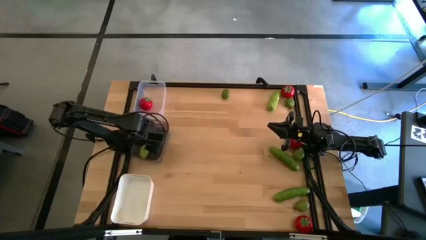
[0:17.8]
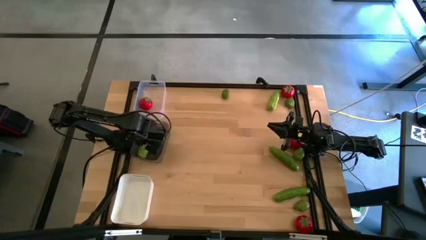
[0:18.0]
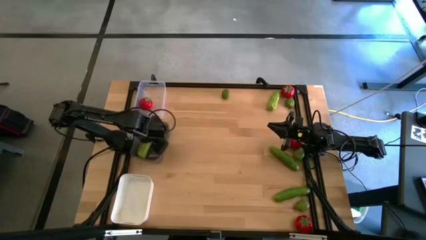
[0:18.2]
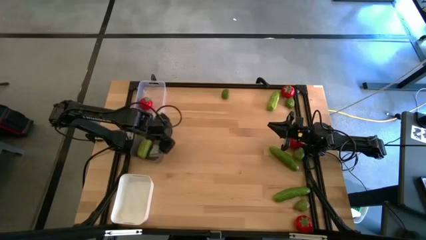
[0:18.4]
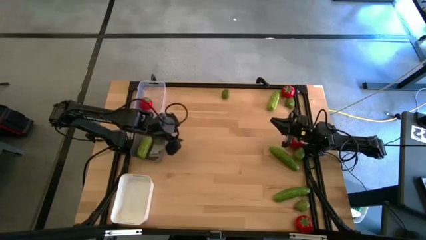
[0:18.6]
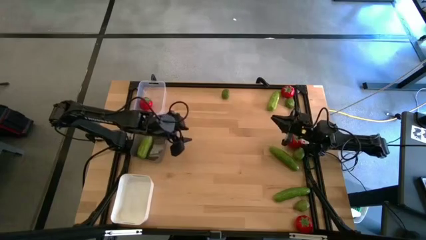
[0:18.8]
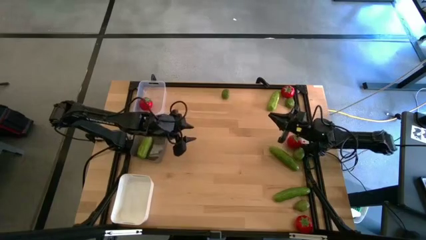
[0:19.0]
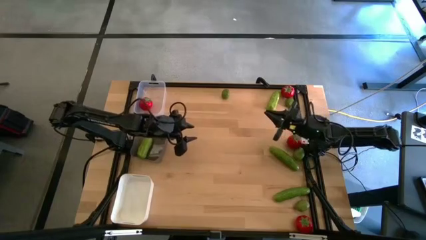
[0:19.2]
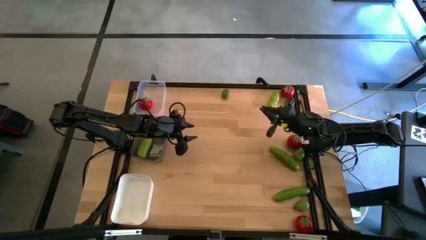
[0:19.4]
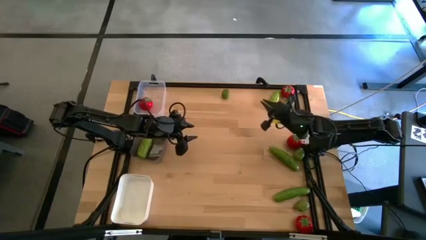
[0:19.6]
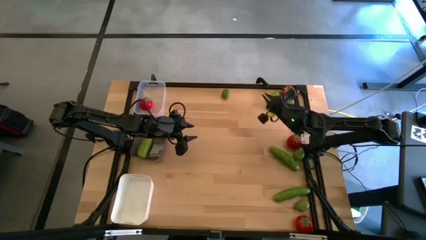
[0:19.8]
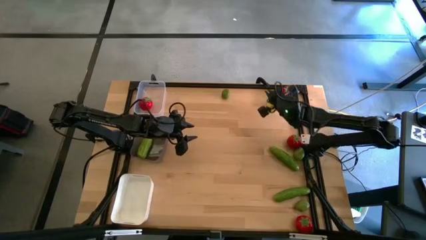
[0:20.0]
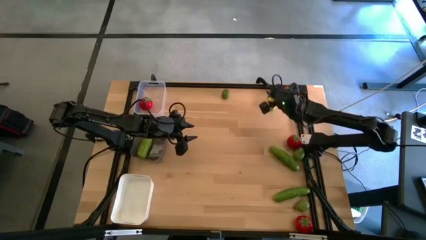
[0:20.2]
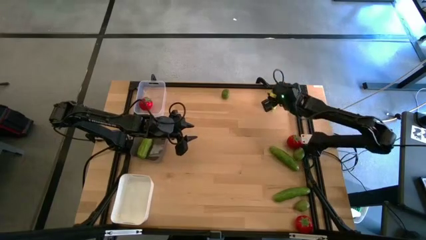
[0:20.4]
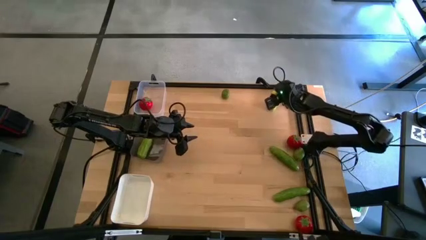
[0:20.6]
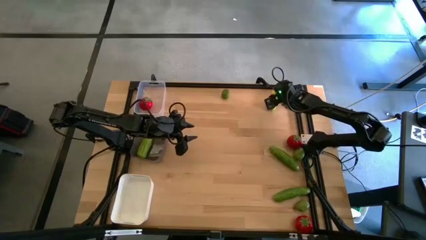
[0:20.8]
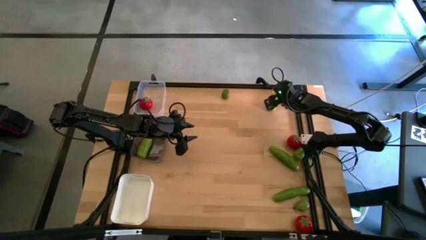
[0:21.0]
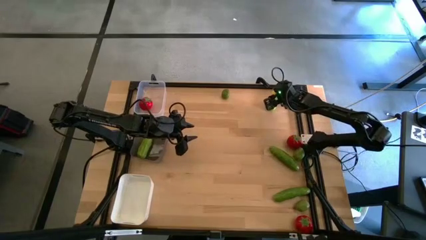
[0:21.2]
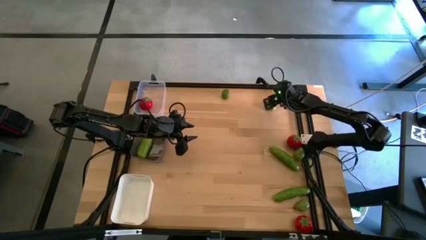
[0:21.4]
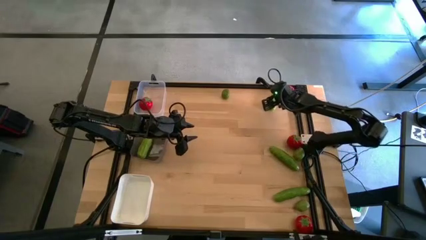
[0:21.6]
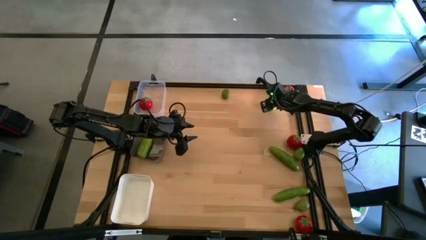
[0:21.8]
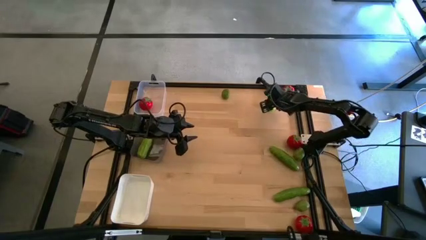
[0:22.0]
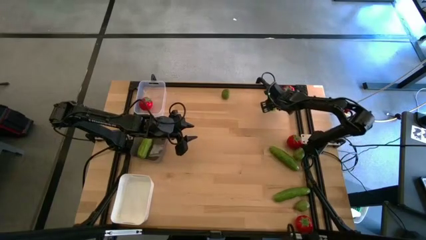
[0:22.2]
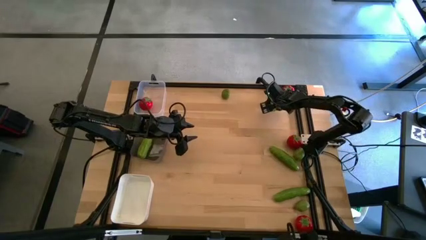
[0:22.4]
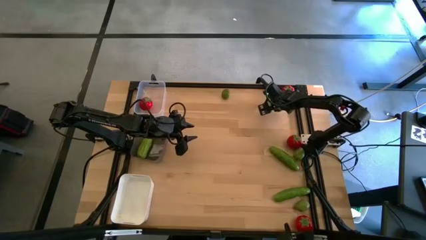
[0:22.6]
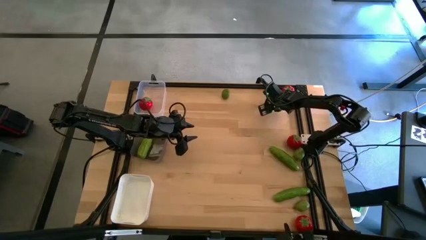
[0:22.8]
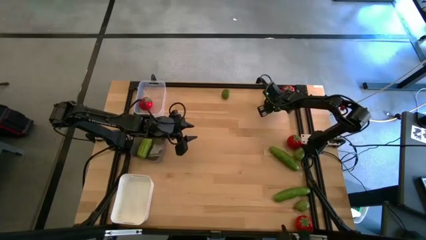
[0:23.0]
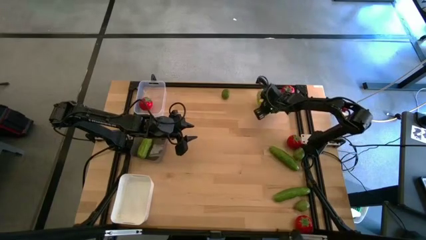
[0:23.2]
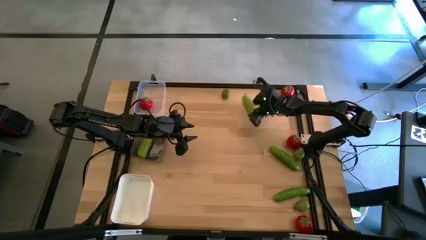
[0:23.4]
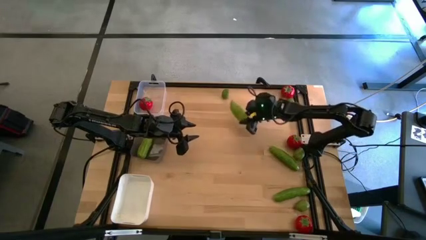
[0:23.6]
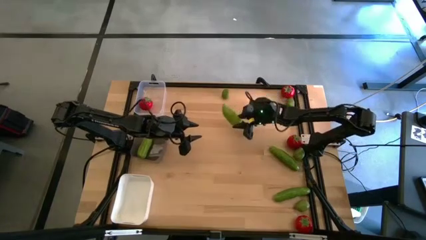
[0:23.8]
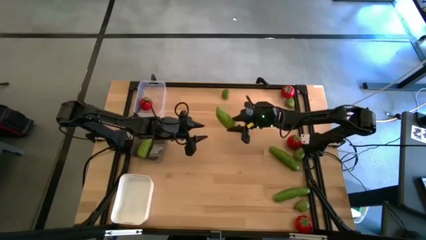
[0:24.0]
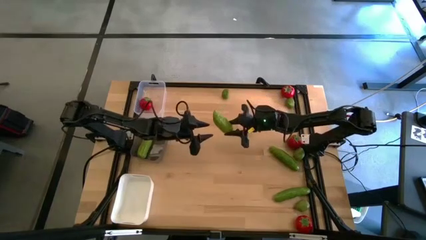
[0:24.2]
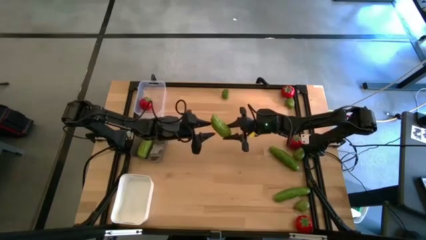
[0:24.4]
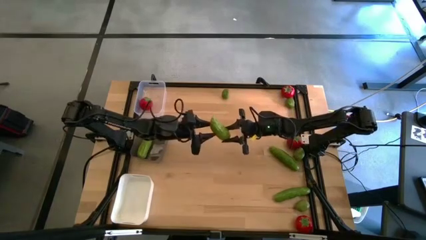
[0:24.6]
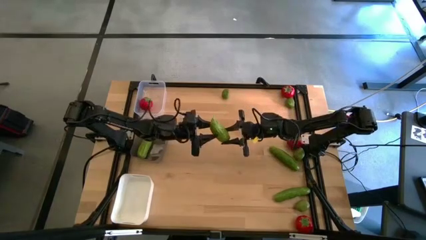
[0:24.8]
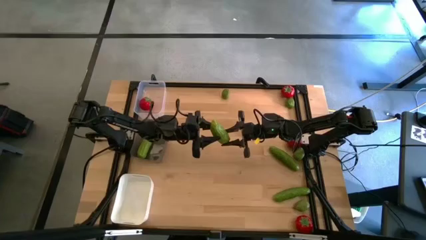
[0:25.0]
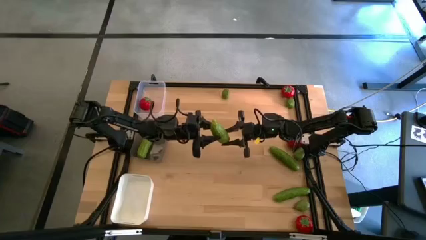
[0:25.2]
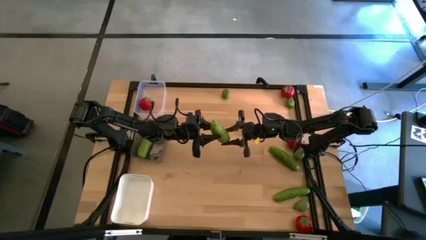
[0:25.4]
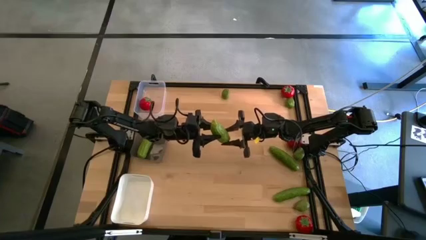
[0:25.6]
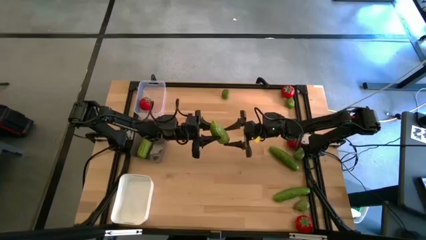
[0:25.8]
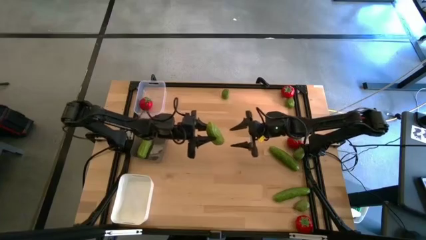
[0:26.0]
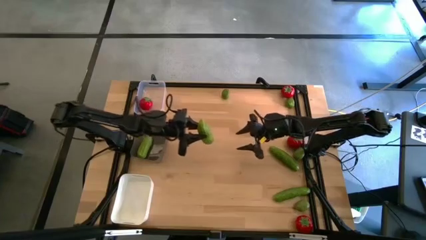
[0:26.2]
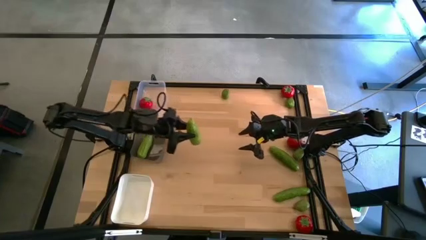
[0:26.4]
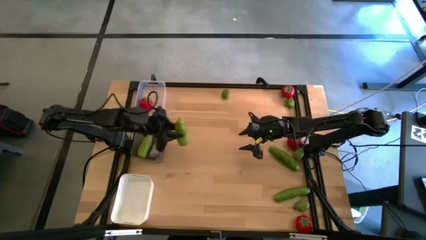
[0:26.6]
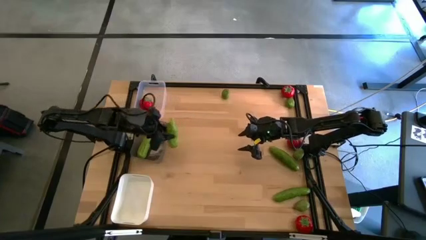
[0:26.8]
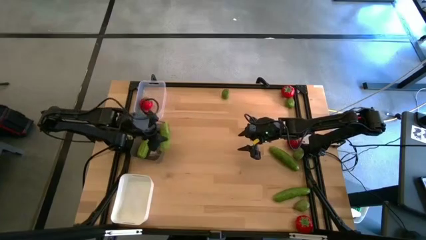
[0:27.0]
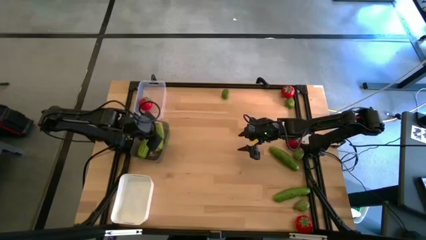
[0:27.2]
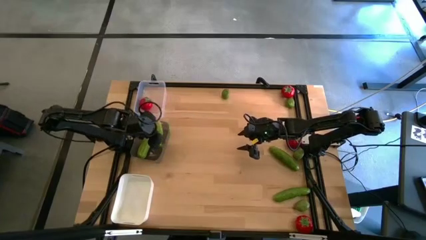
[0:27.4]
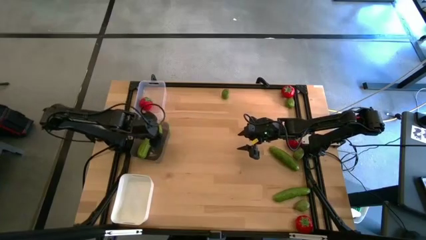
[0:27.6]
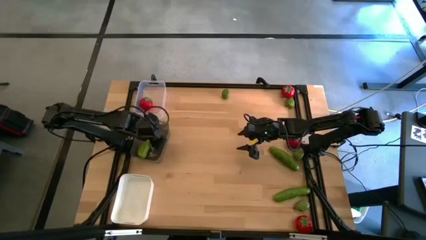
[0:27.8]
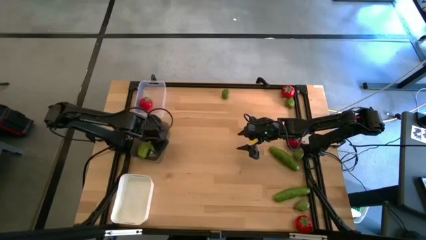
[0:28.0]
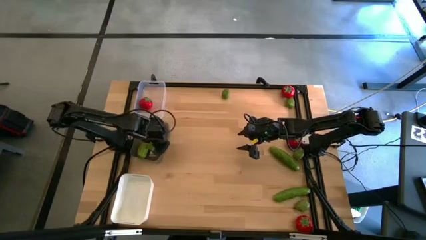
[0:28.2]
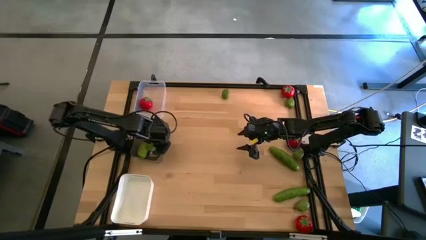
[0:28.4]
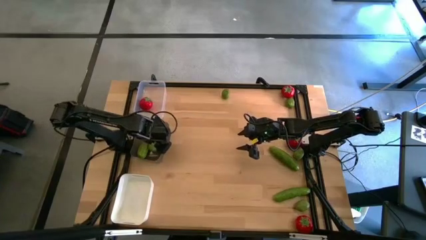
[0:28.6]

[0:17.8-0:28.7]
Task: Sort produce into baskets
Put the top right bitter melon into the black bin

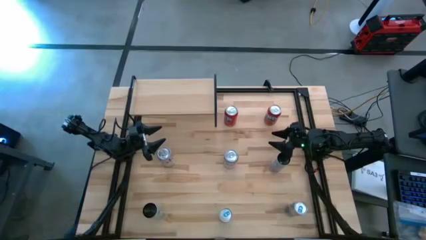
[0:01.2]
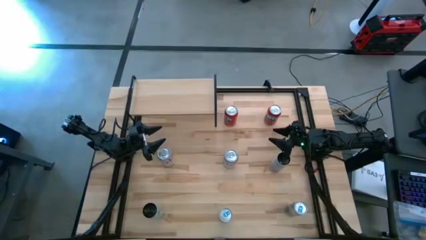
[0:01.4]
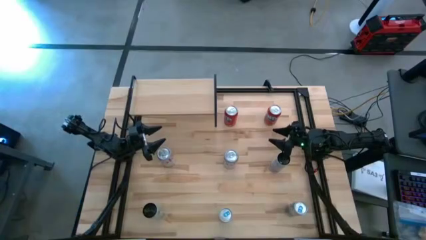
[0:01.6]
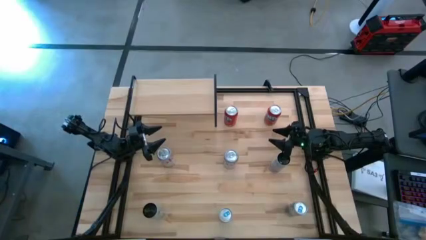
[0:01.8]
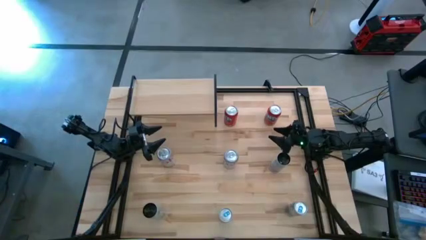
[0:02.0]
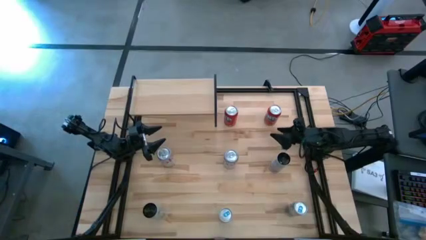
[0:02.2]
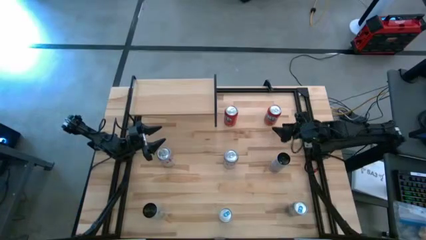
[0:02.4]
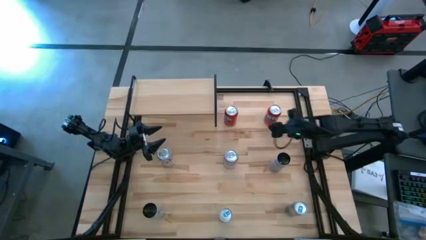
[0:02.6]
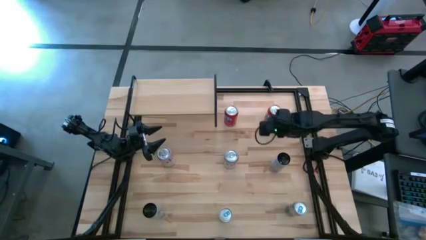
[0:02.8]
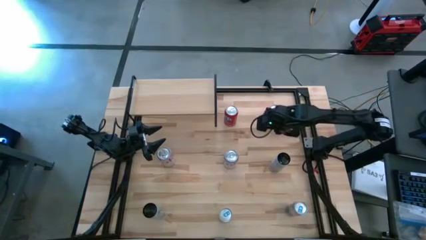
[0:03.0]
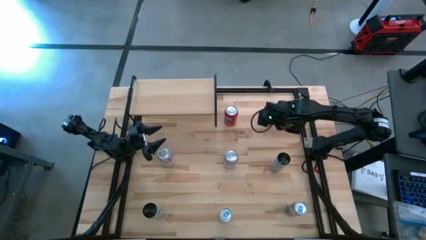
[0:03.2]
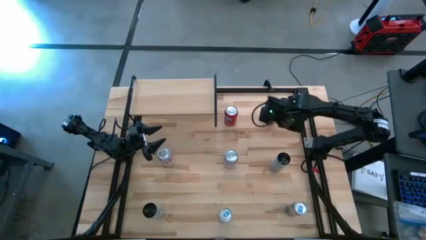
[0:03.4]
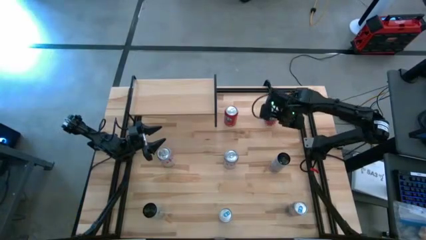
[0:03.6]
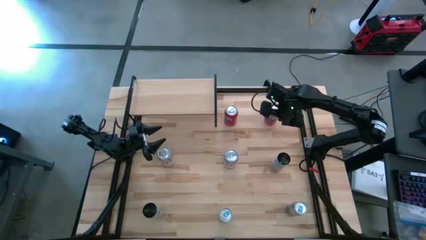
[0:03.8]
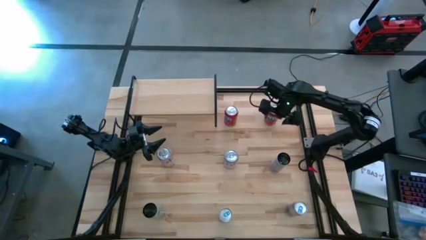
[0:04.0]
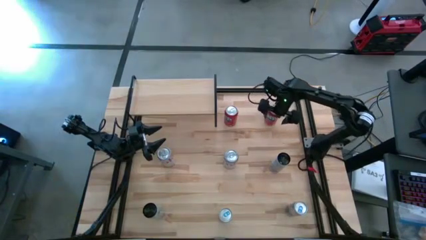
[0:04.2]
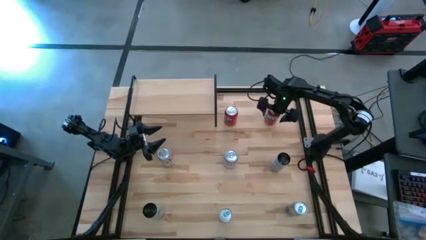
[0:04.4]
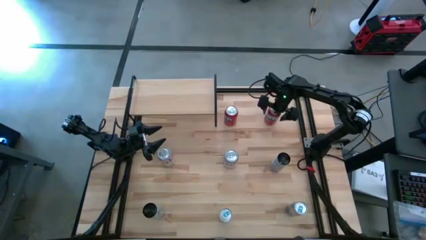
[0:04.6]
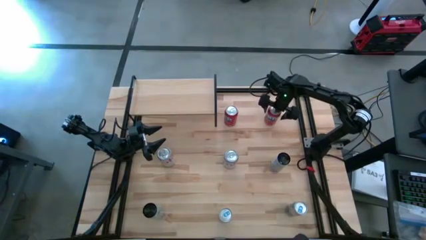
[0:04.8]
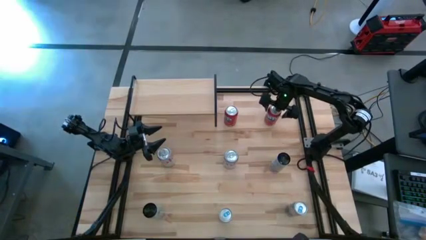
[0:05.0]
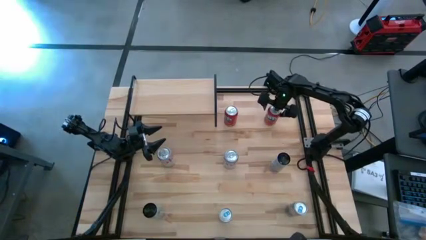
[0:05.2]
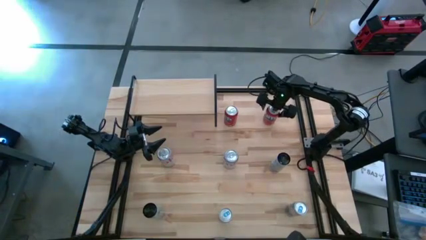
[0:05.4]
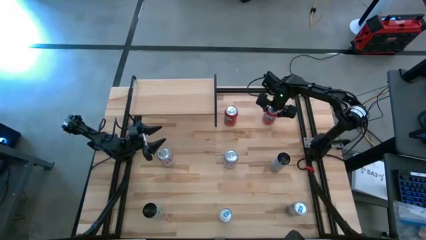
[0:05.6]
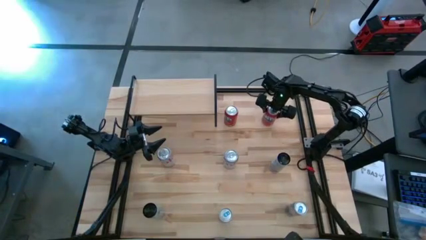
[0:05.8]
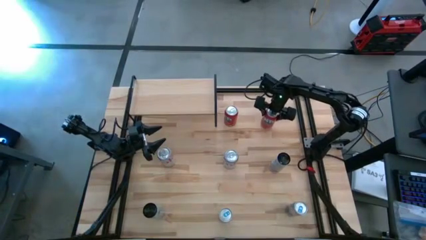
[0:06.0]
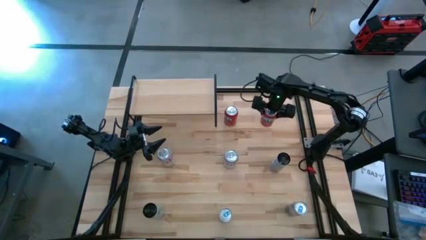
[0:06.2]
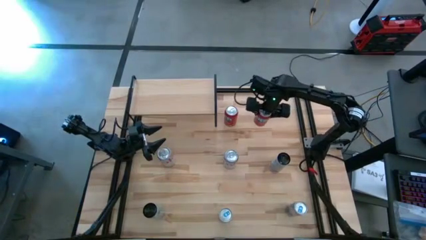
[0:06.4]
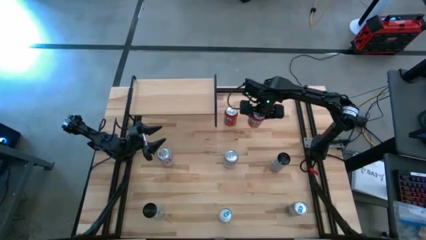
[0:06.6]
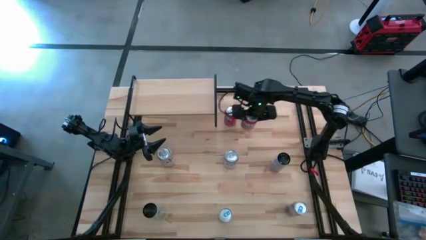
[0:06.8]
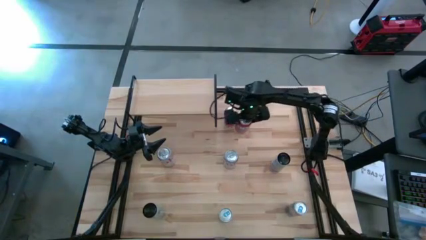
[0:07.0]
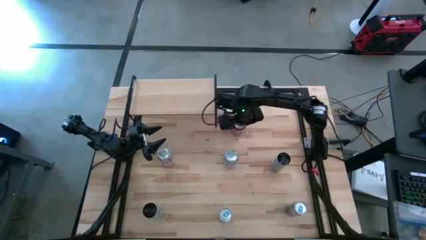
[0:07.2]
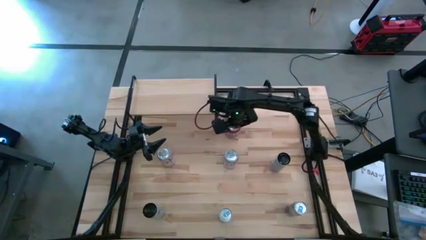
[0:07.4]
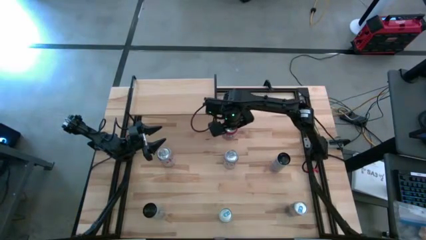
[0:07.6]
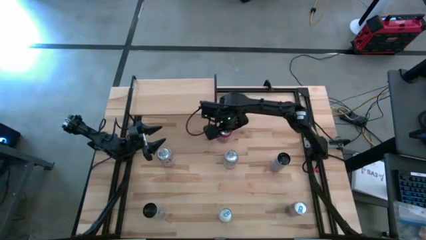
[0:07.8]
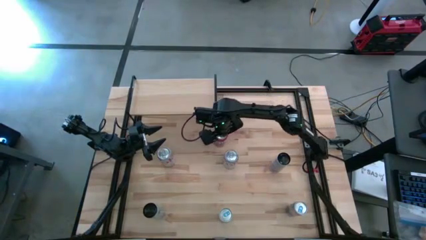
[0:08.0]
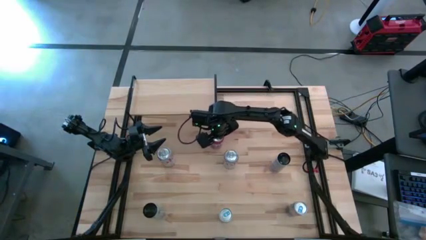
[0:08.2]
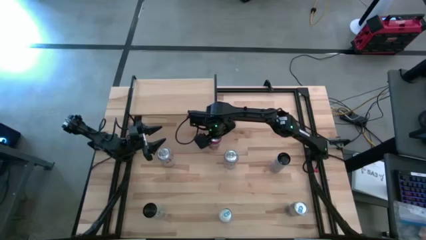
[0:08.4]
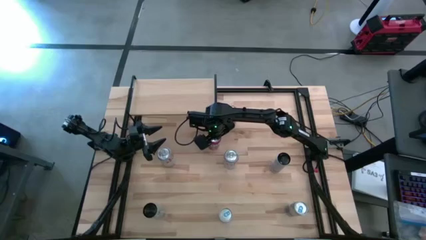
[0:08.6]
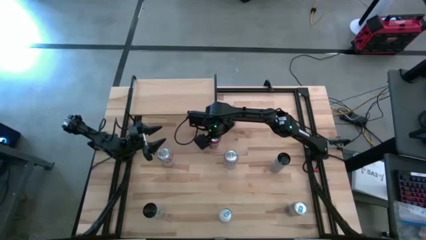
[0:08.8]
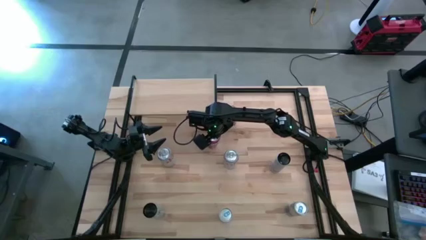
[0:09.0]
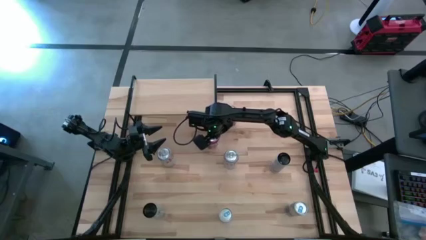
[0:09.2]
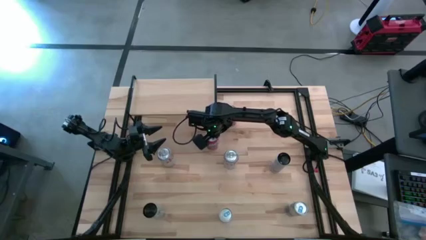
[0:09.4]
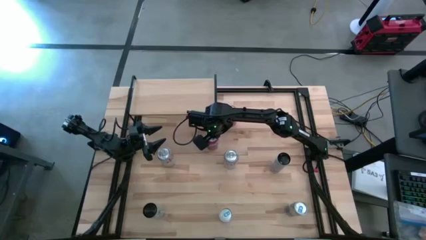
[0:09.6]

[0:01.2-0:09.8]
Task: Place canned beverage on shelf
Move the right orange soda can to the center of the table
